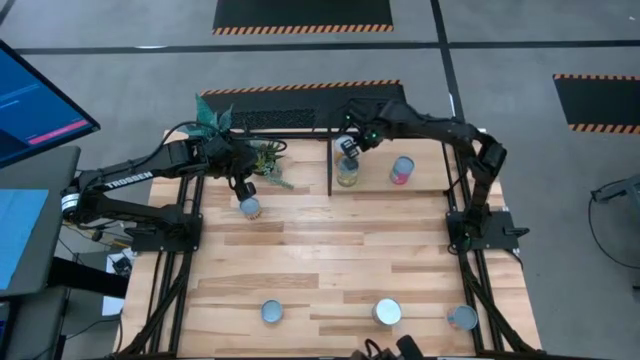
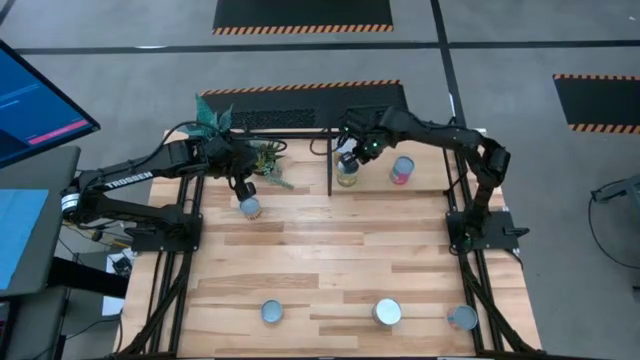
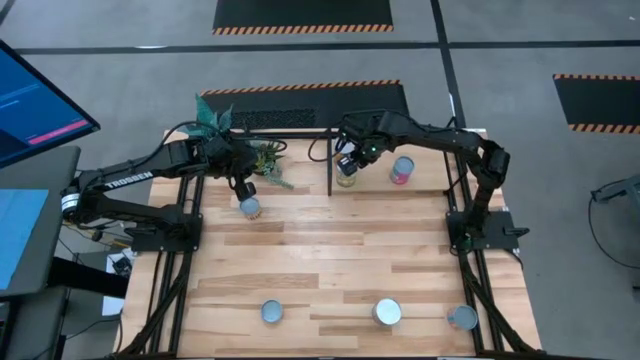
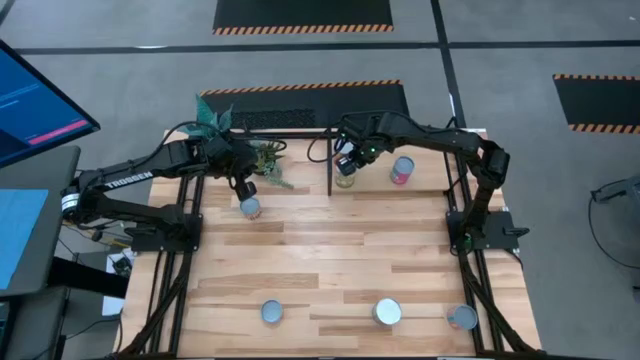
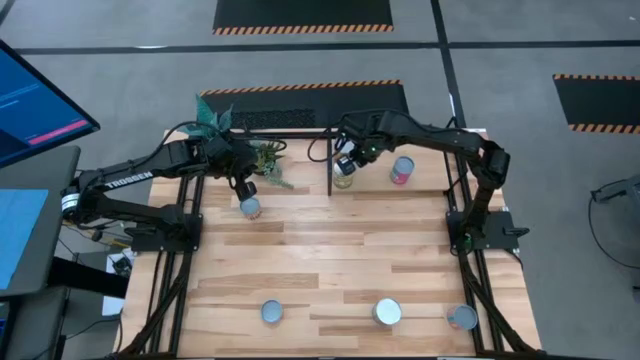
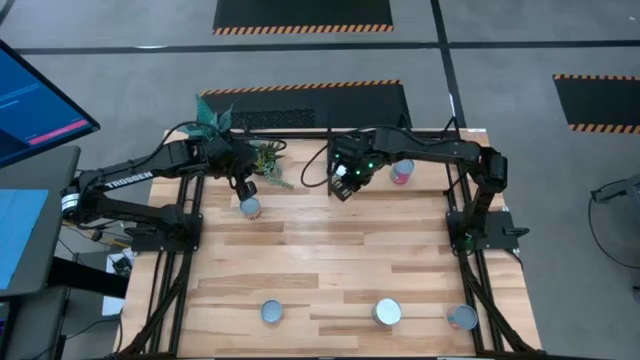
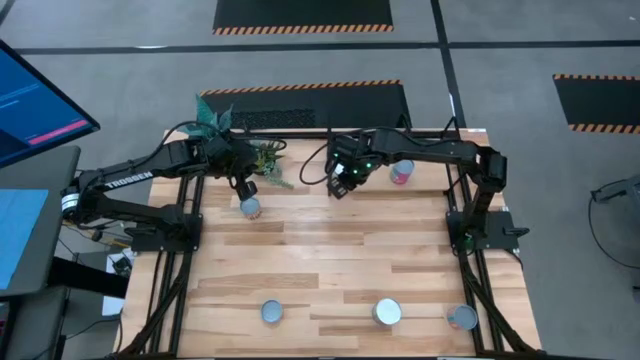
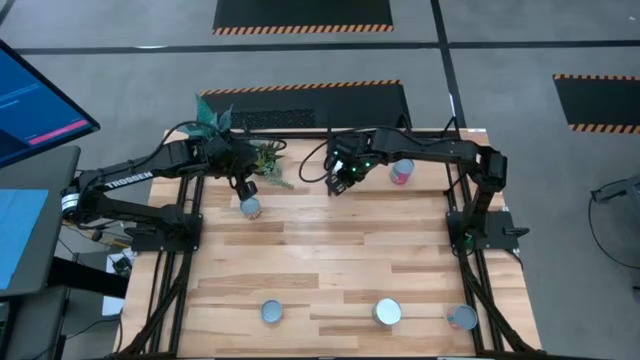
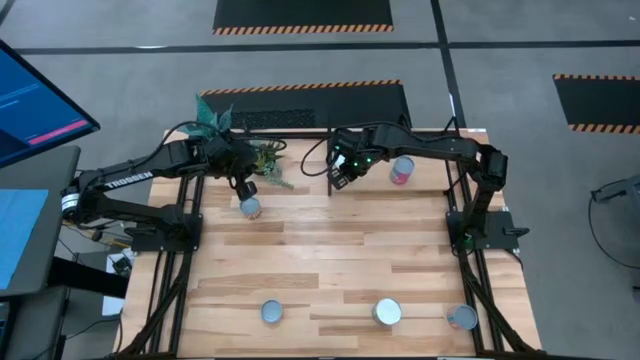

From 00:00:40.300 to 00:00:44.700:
Task: Pick and place cans onto a shelf
Adjust the canned pears on the shelf

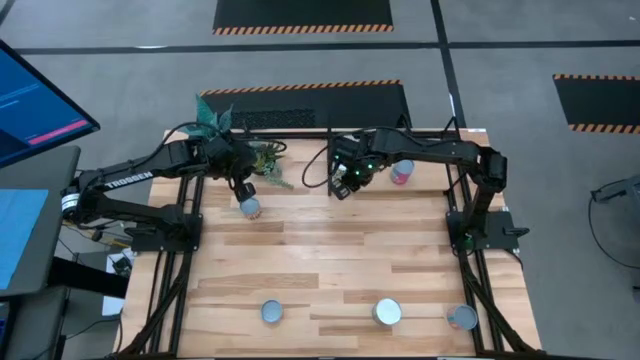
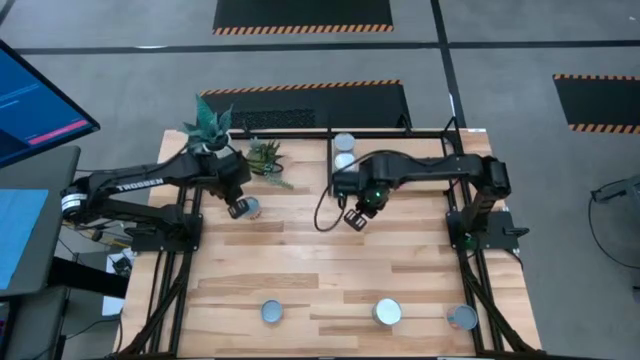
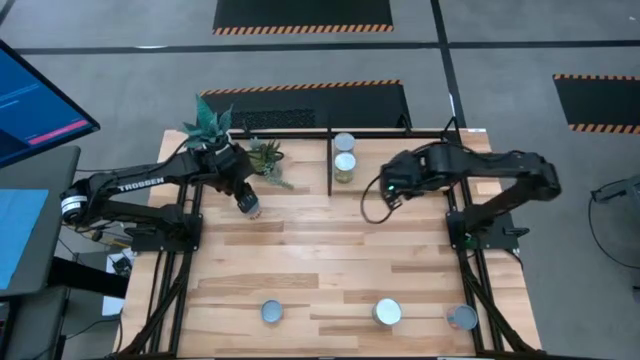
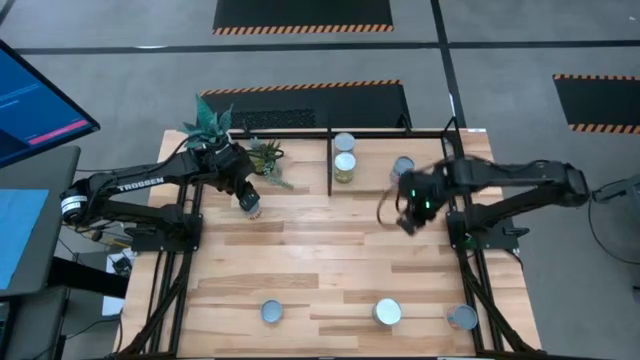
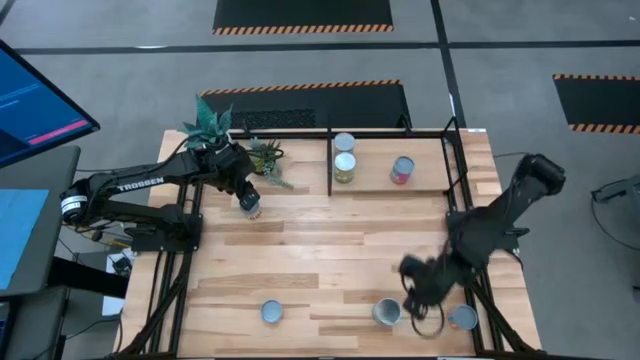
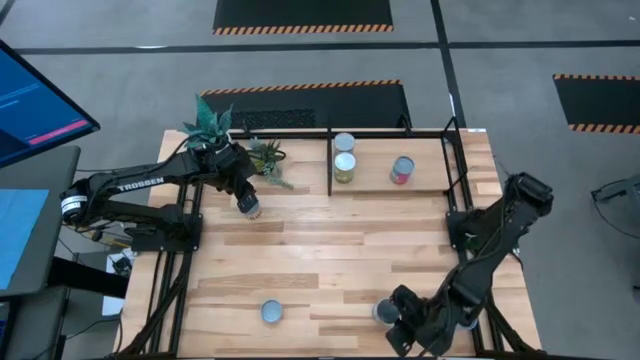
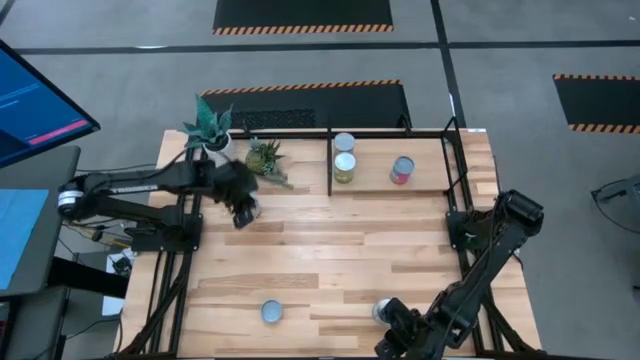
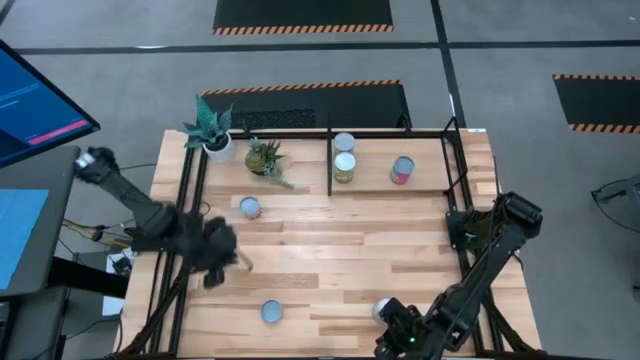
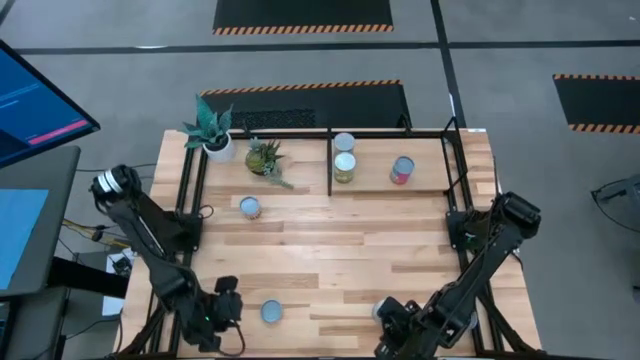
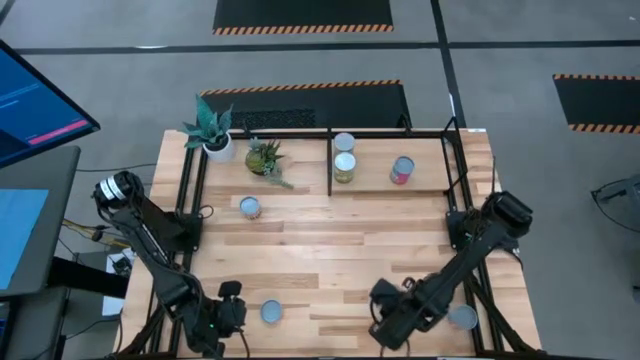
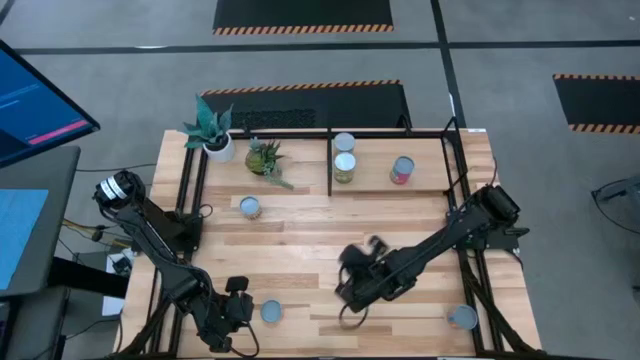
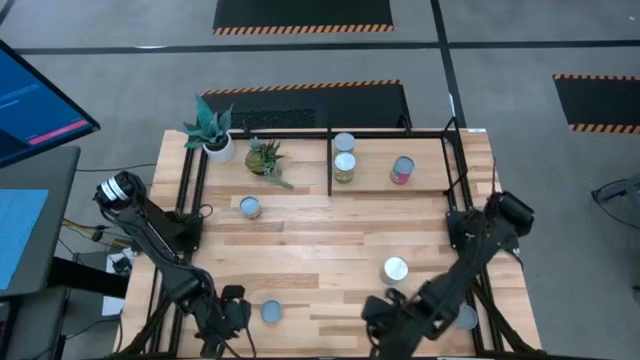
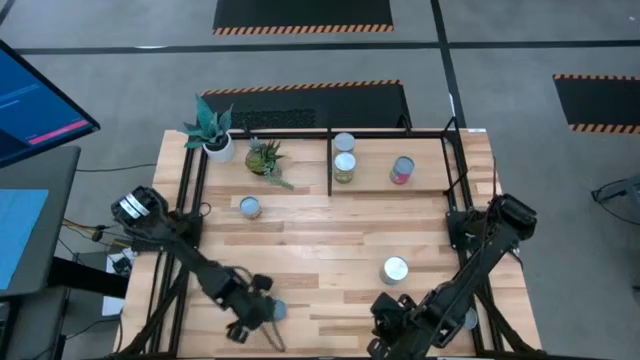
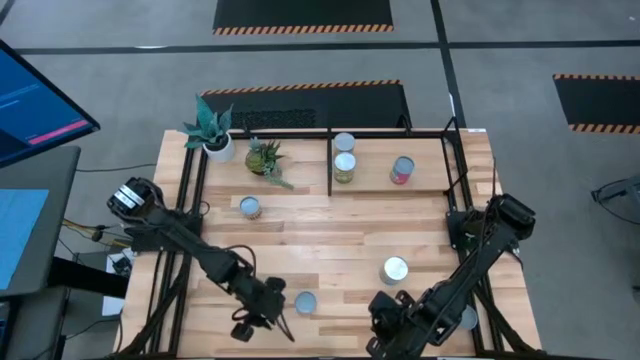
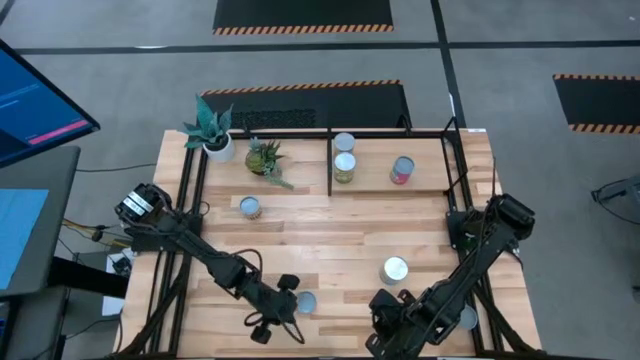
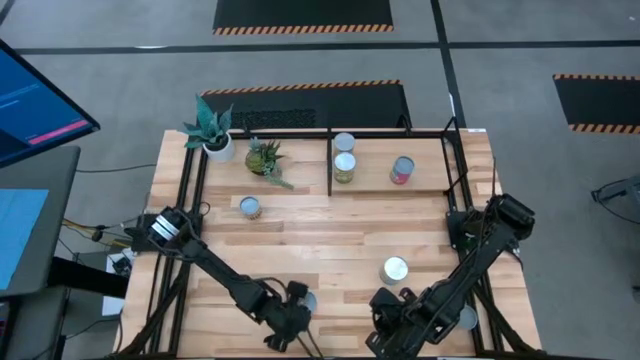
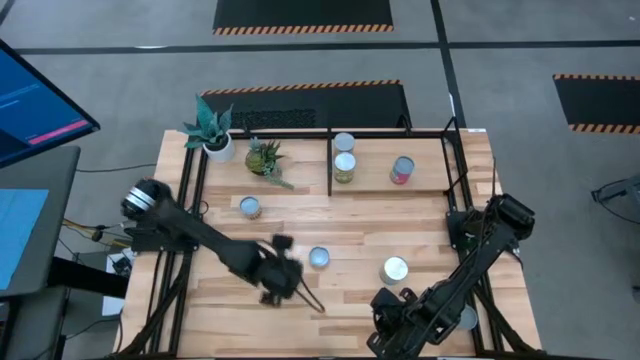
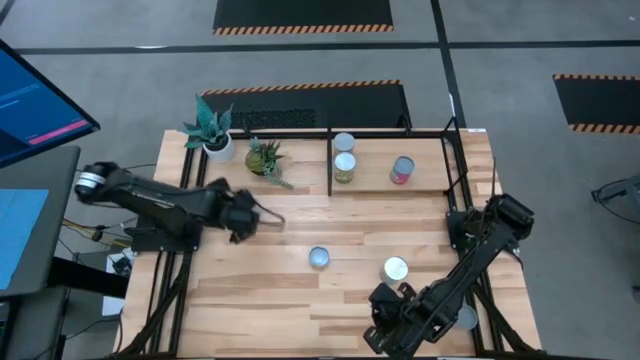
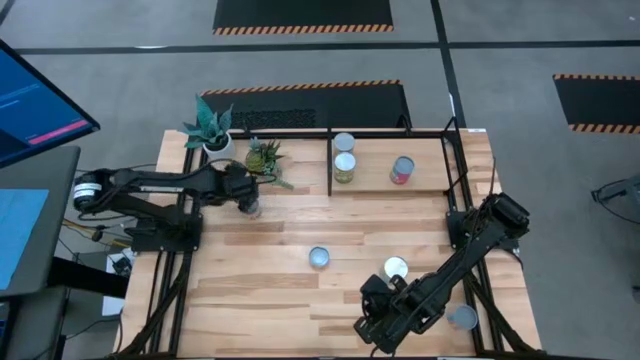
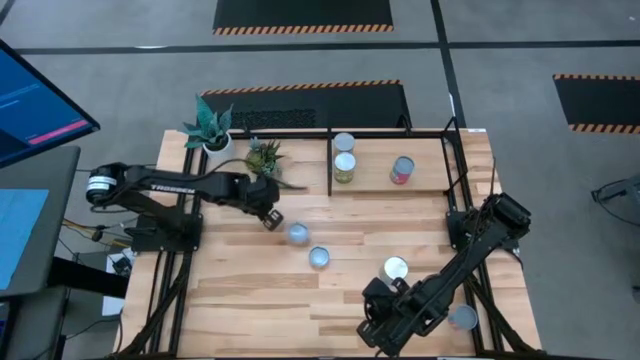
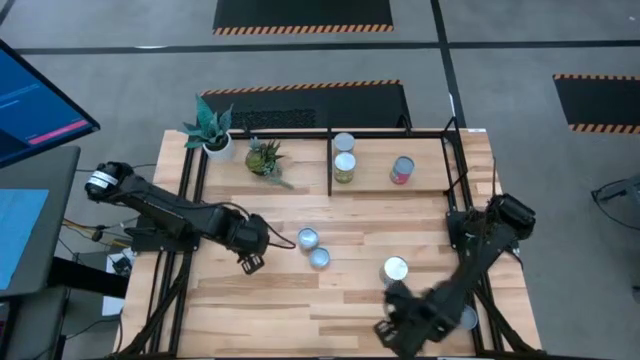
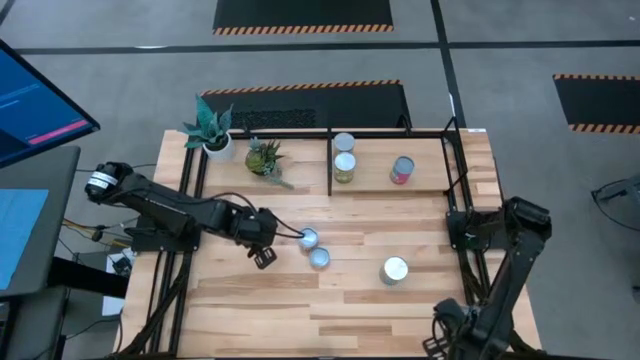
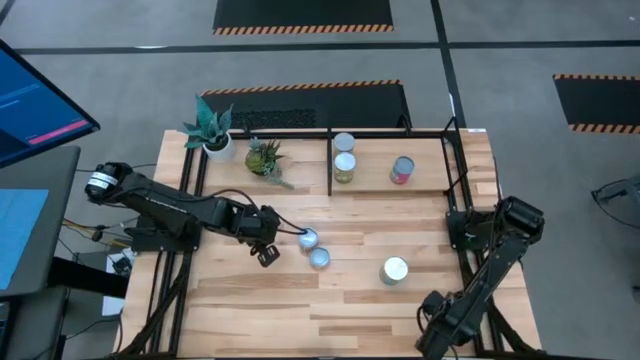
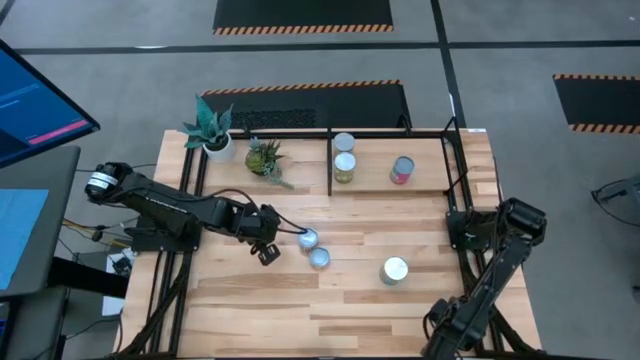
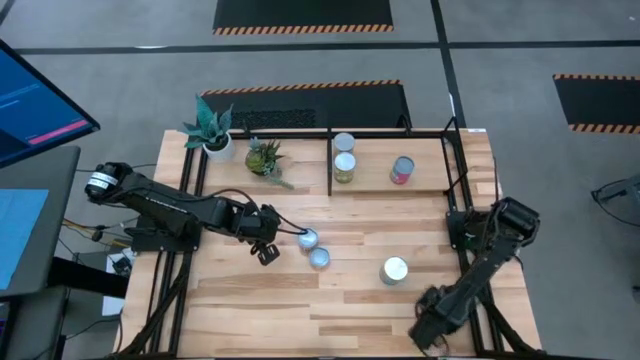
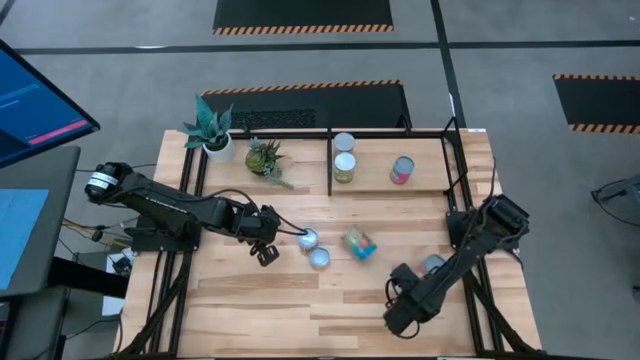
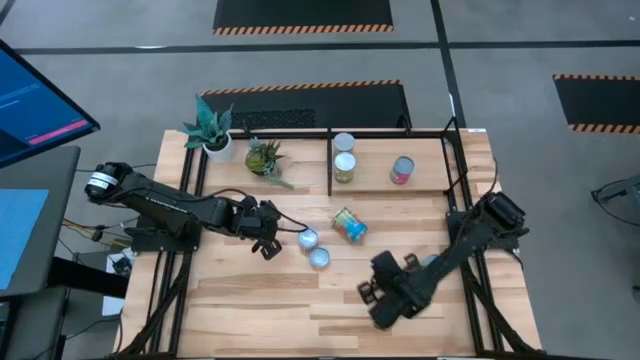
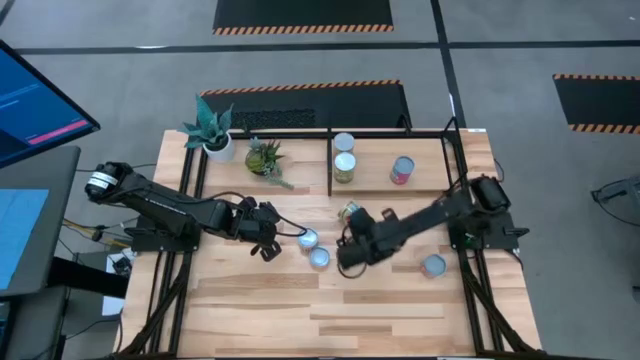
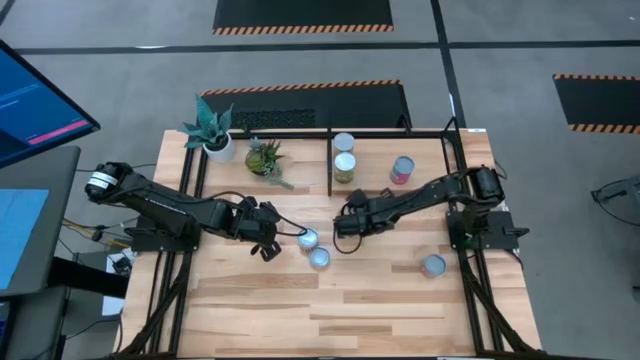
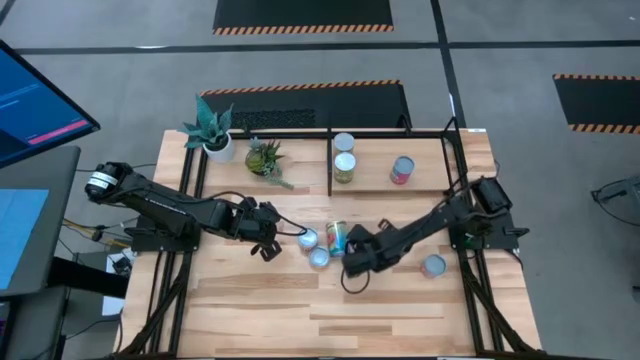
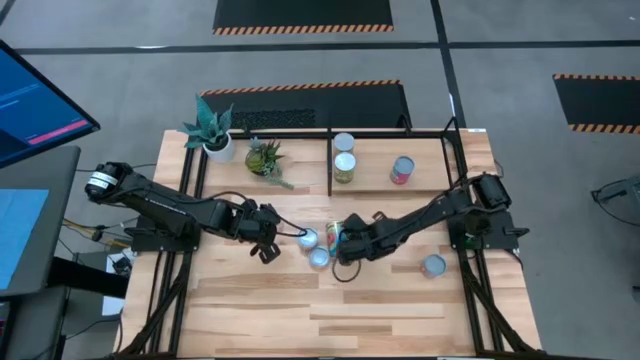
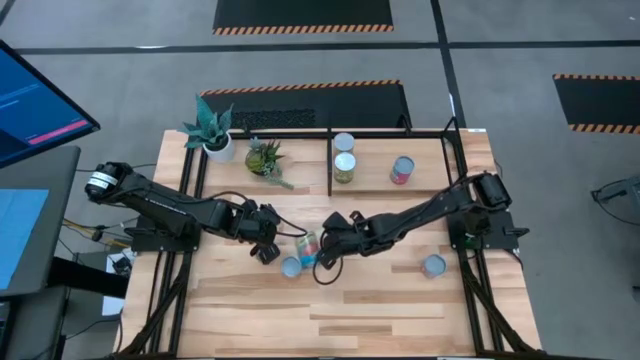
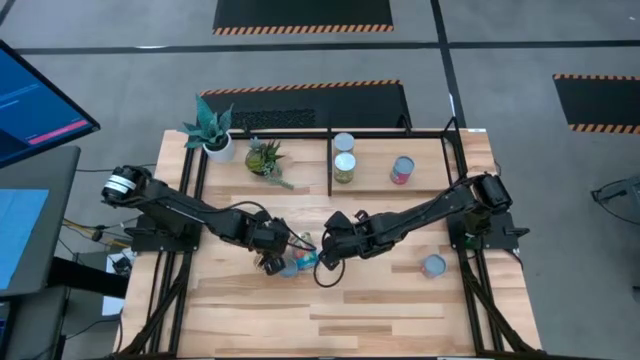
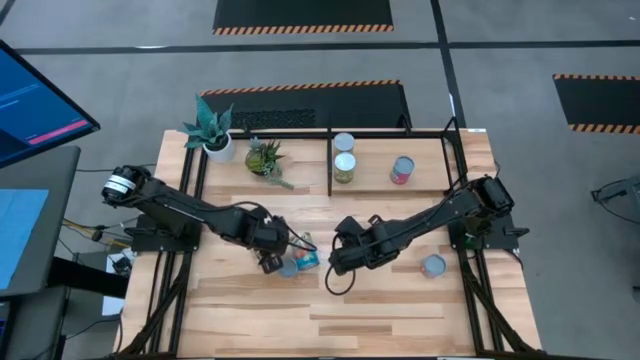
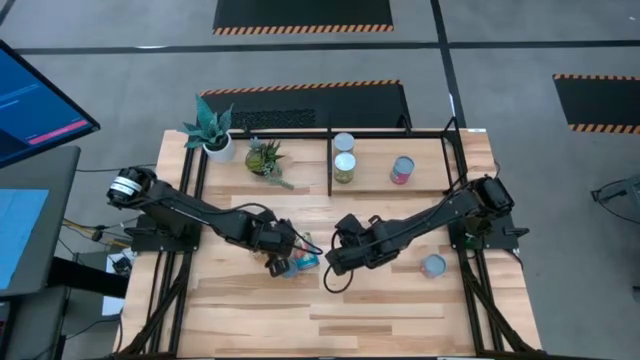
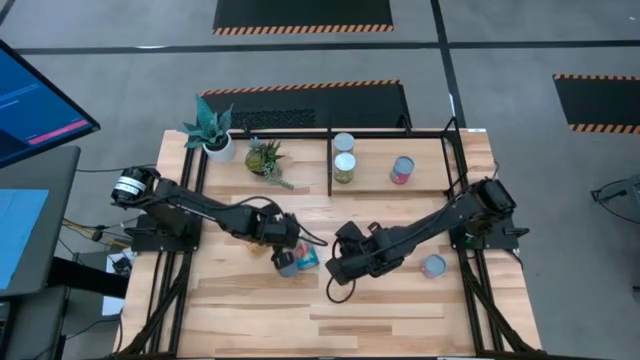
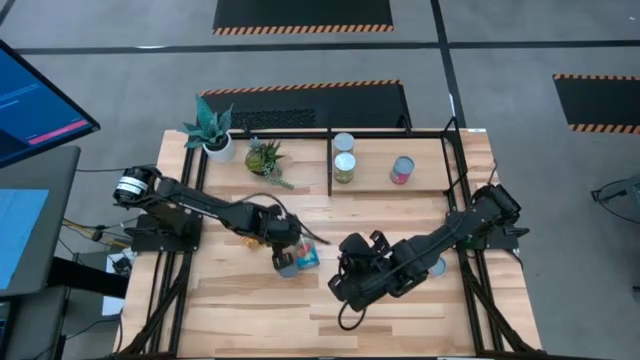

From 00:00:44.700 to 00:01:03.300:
Prepare the canned goods to the center of the table
